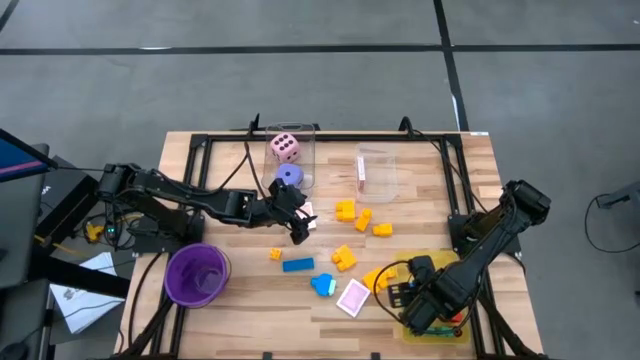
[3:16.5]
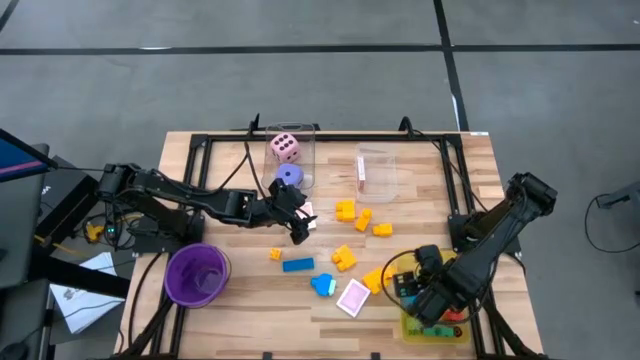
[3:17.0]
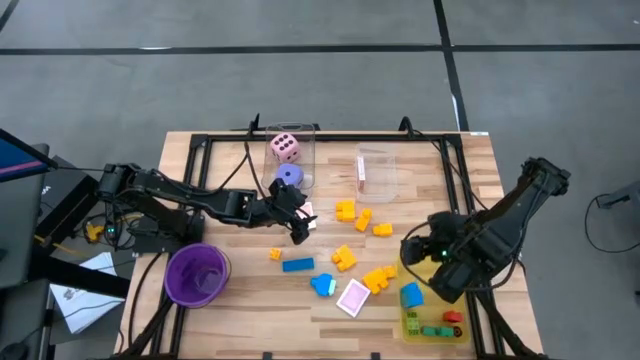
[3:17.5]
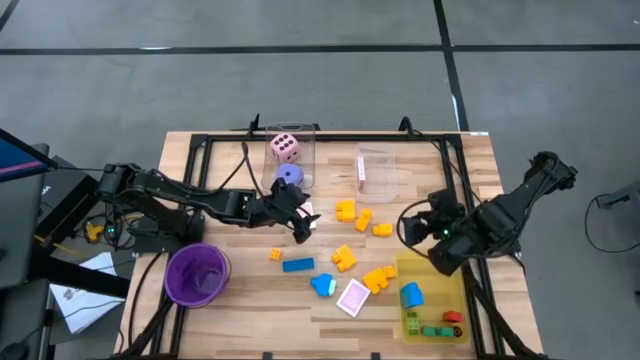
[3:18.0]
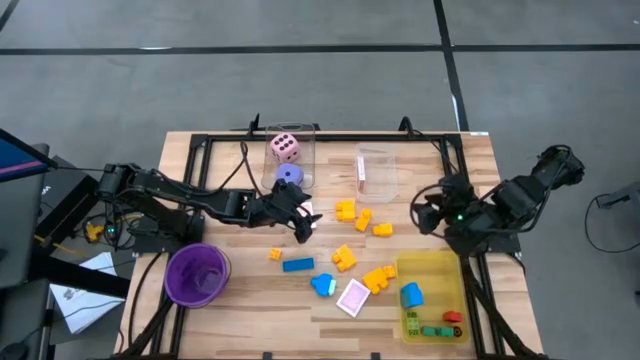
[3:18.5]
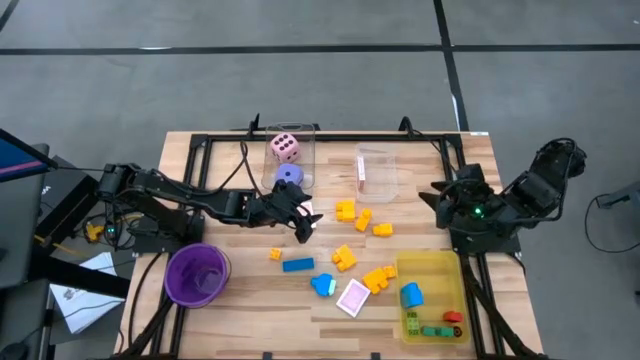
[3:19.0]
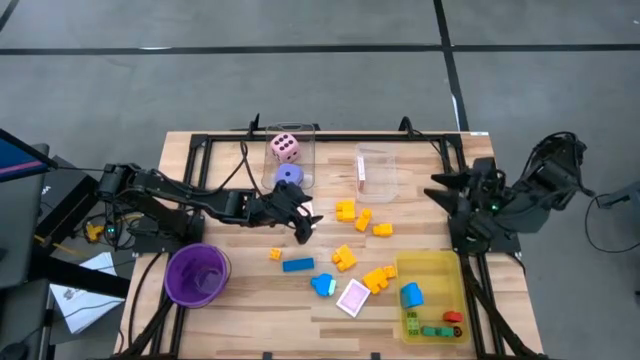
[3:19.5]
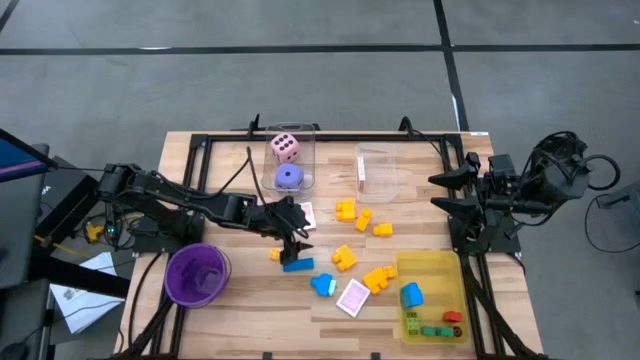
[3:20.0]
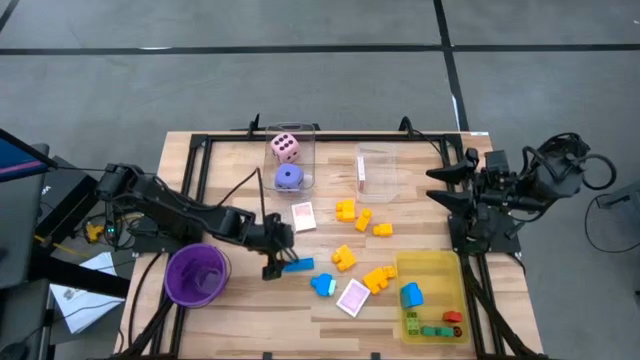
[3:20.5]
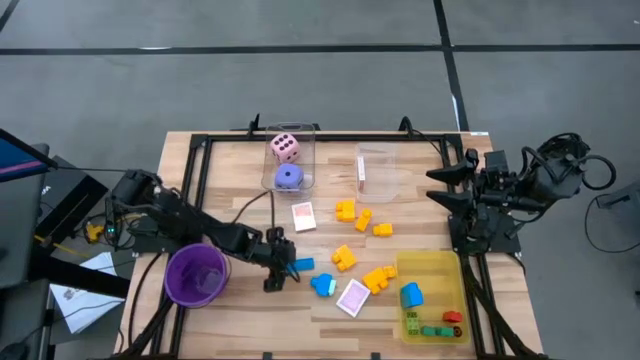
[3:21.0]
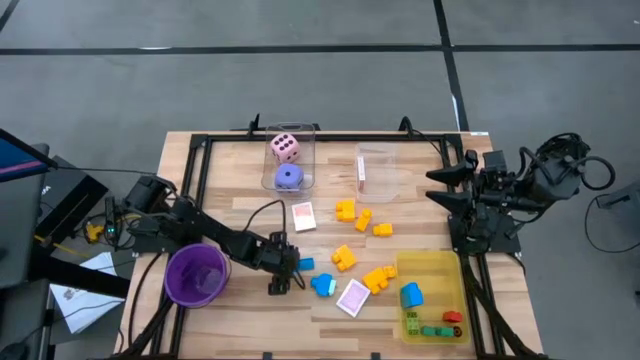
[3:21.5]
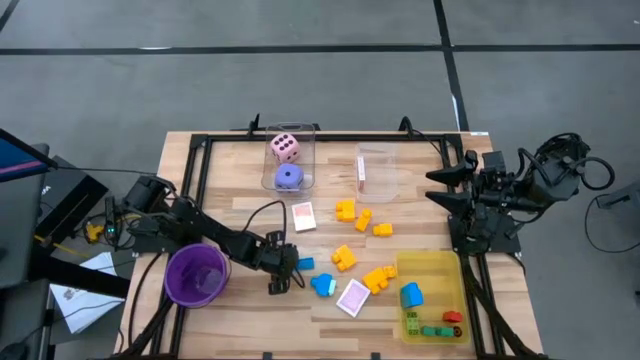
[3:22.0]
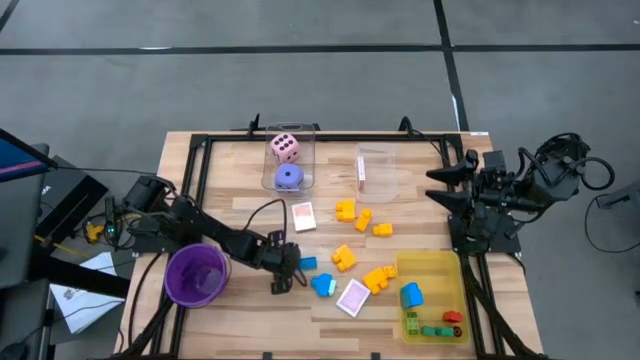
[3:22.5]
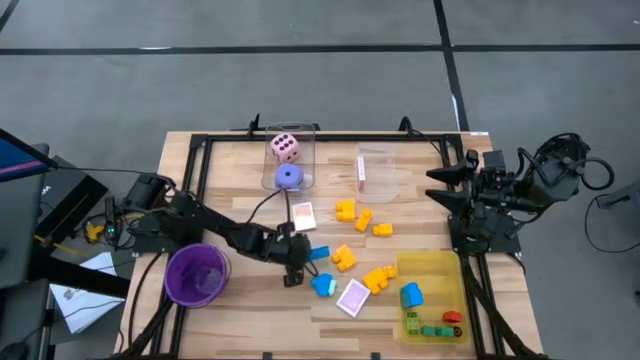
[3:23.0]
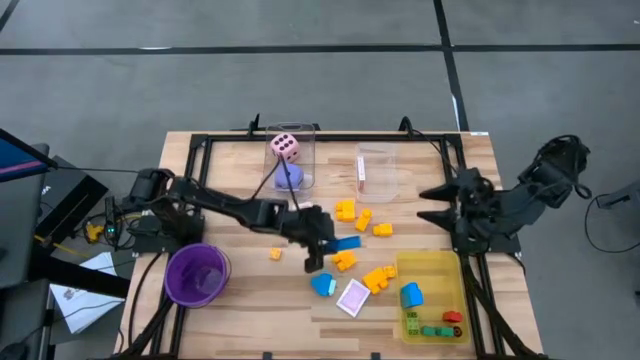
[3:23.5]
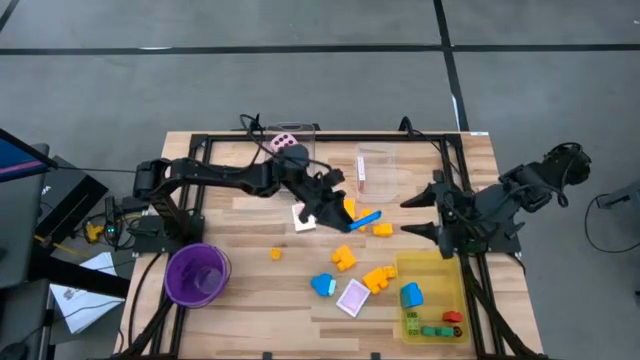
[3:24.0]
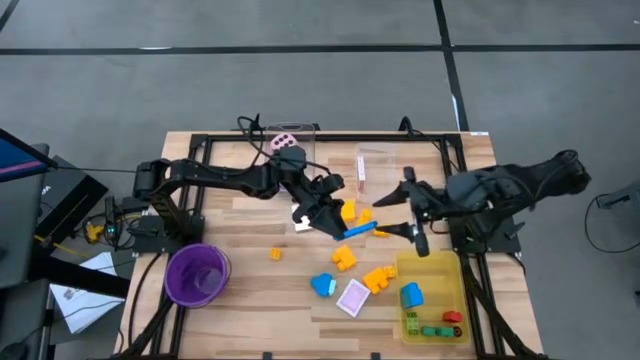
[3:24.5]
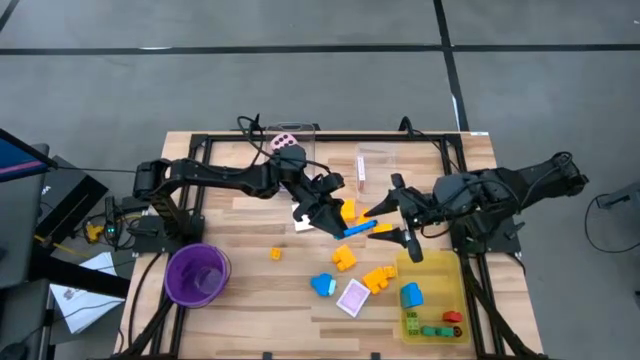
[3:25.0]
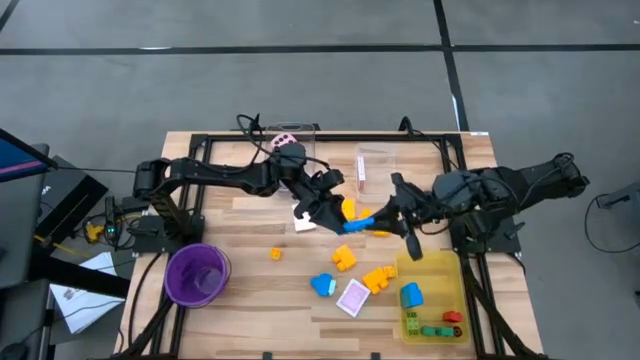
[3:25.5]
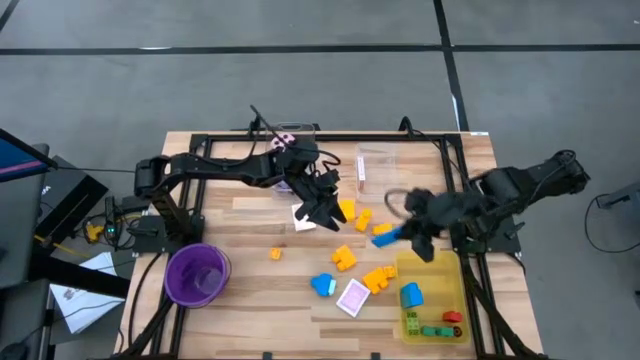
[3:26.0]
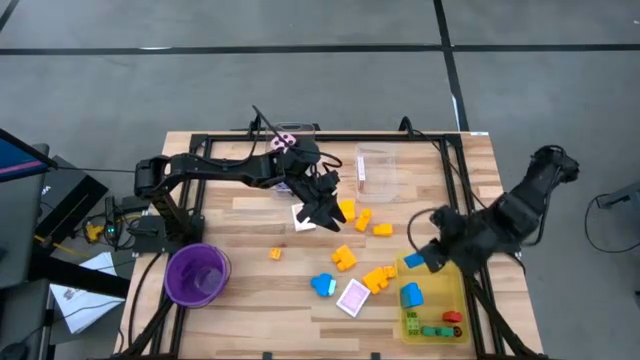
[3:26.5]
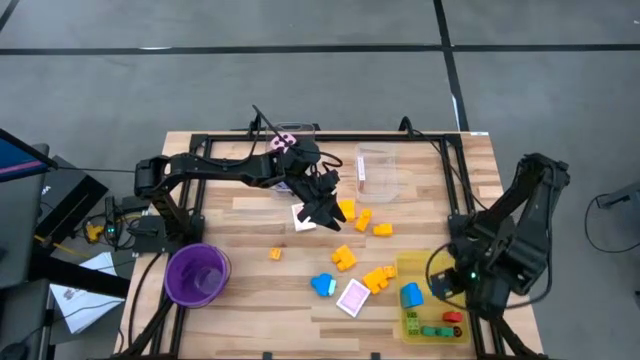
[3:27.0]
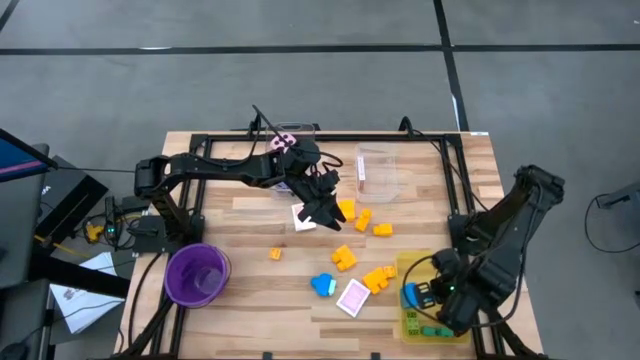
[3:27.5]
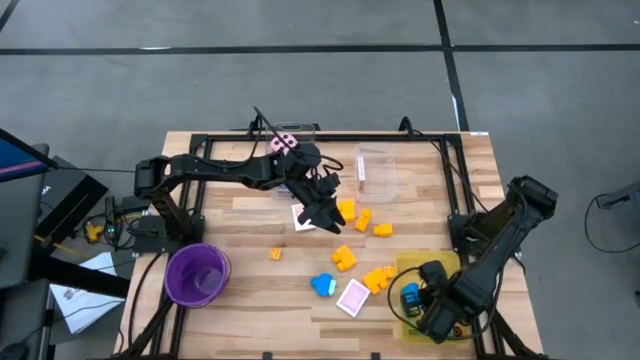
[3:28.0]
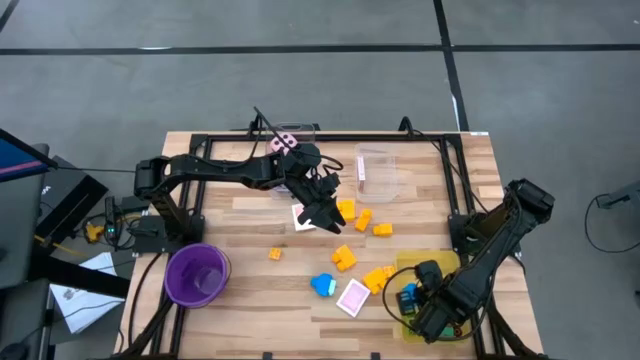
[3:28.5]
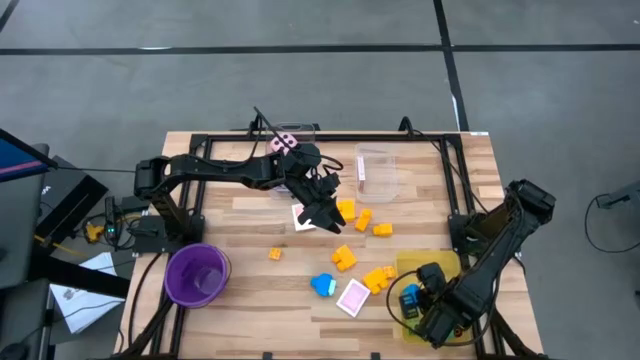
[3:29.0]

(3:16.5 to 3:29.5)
Task: Pick & Place Toys
Put the top blue game piece into the bin

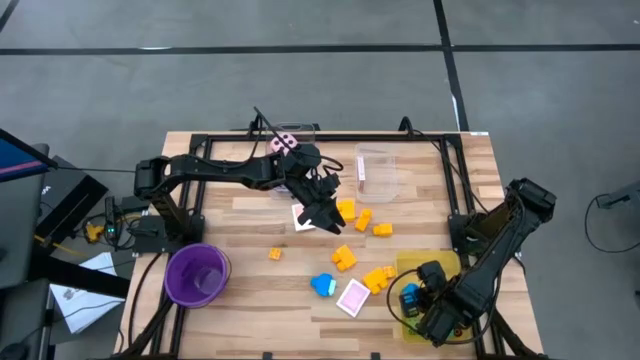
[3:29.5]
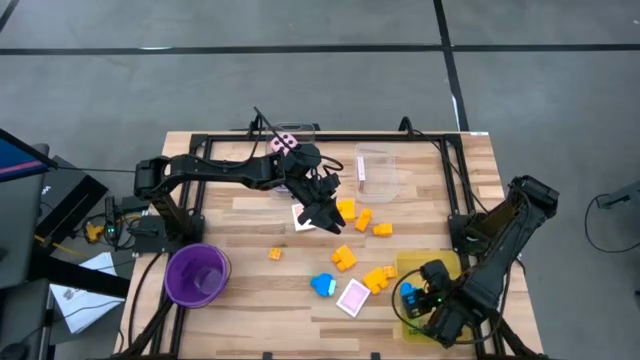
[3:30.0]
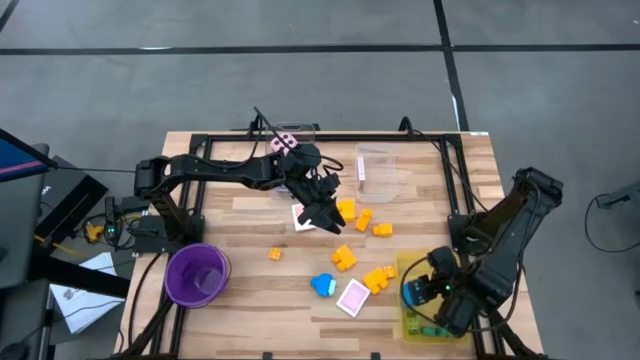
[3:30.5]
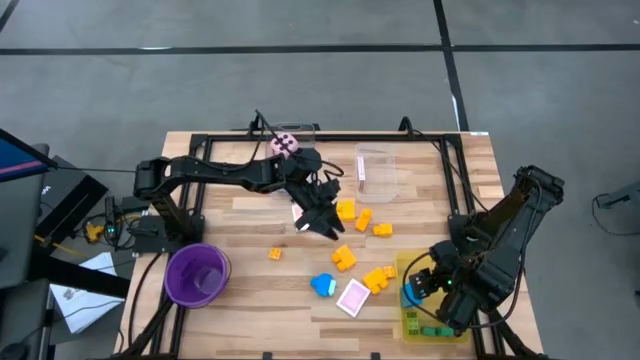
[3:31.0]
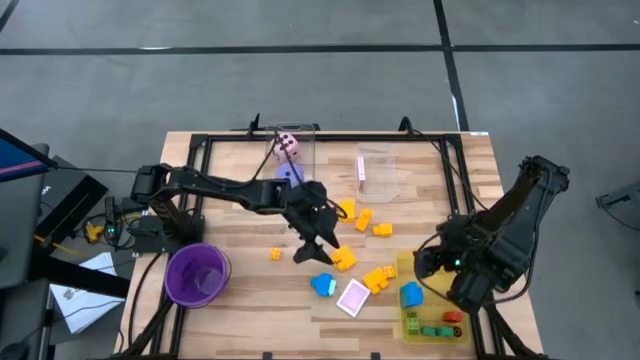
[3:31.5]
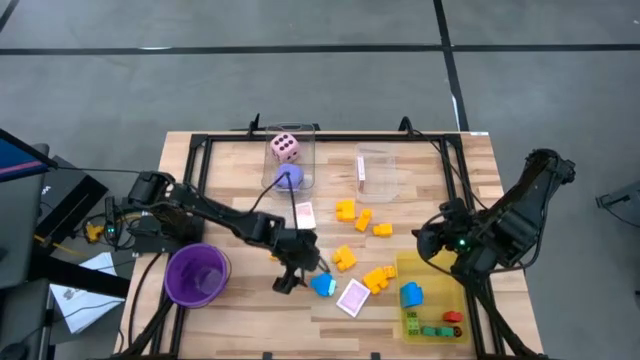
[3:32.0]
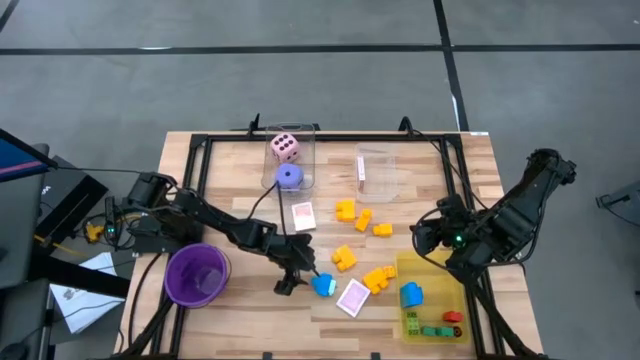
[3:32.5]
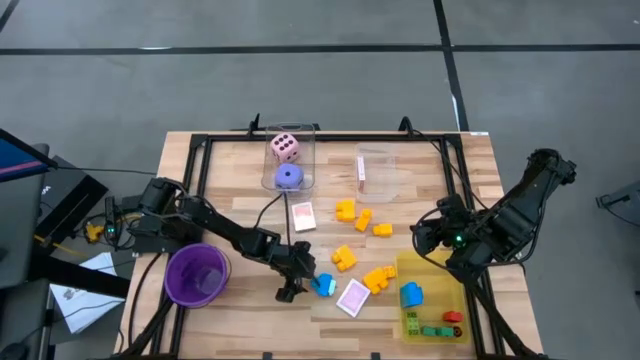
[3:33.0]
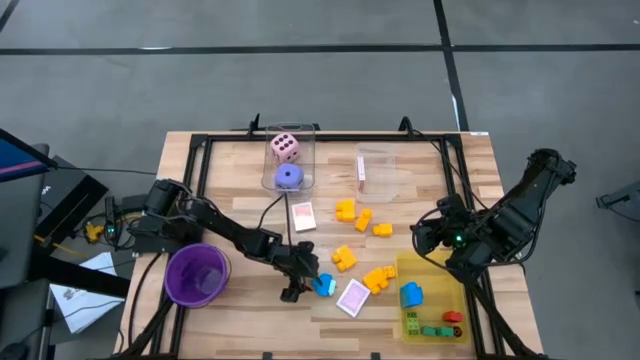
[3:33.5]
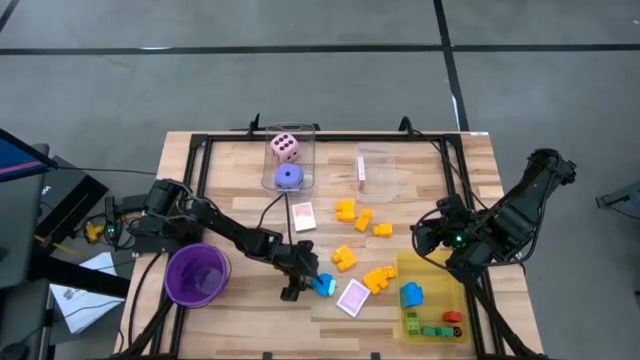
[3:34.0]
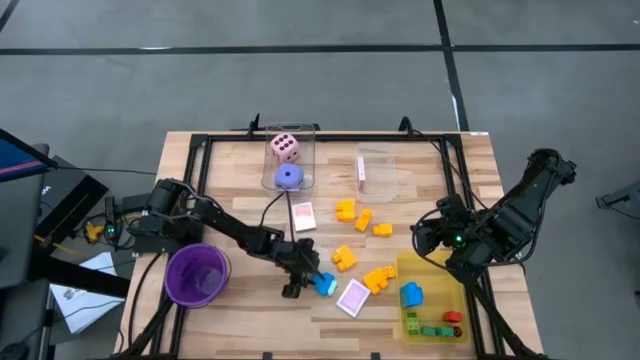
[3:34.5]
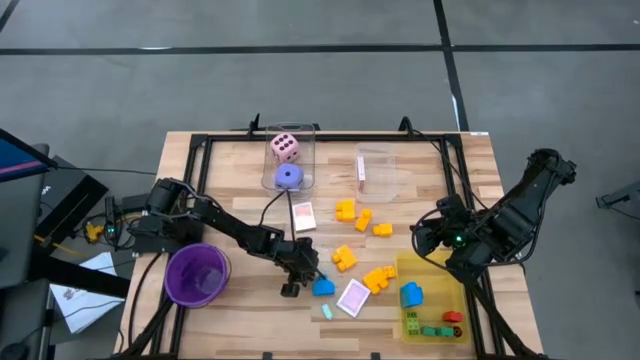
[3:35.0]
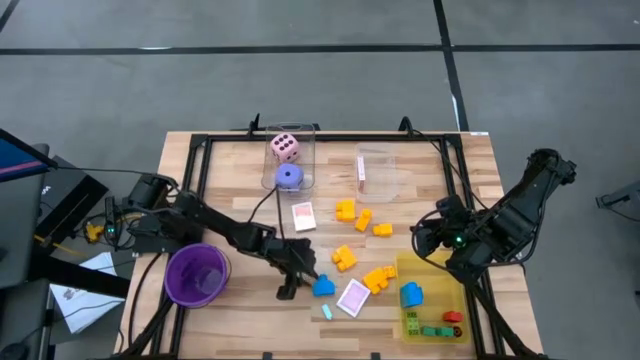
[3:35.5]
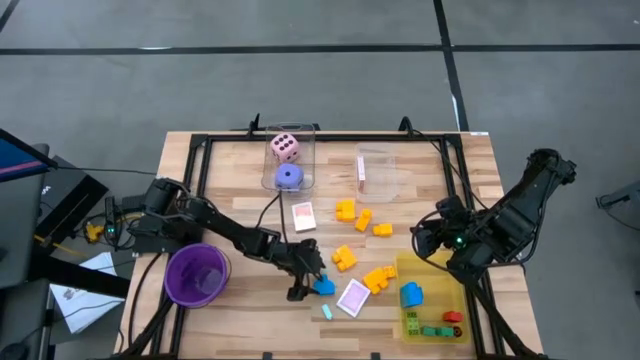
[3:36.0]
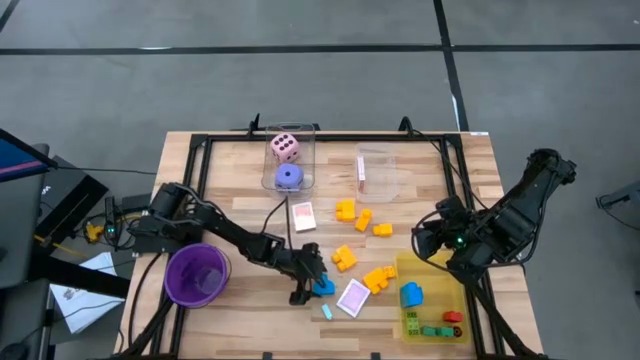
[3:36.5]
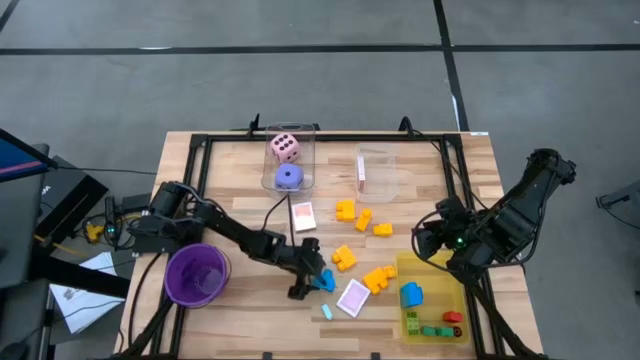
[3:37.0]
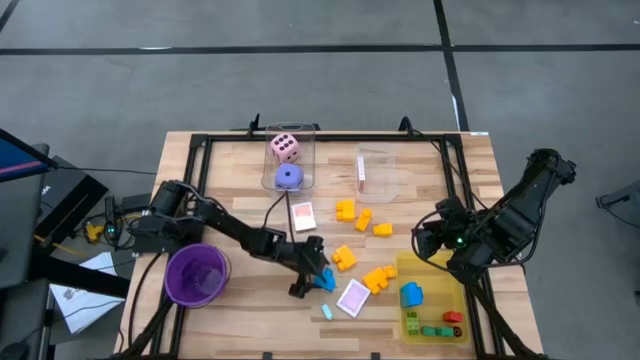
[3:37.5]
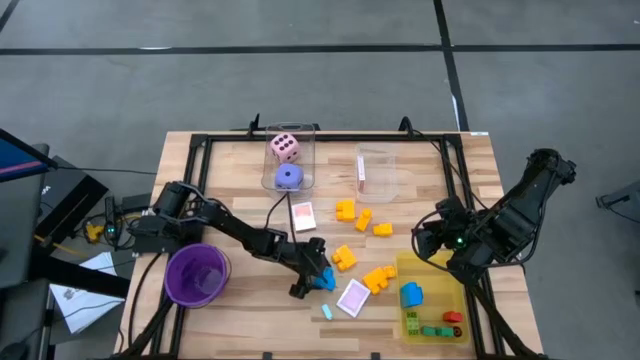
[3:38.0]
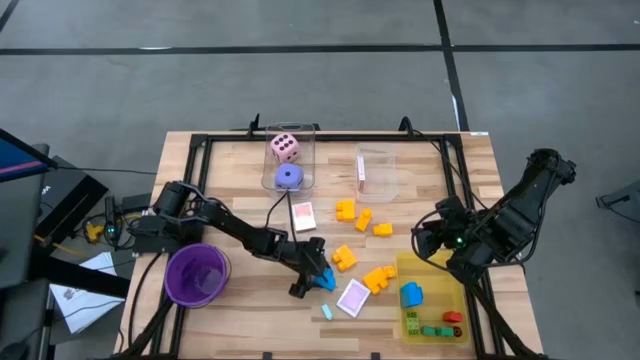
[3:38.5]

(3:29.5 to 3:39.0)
Put the blue game piece into the bin
